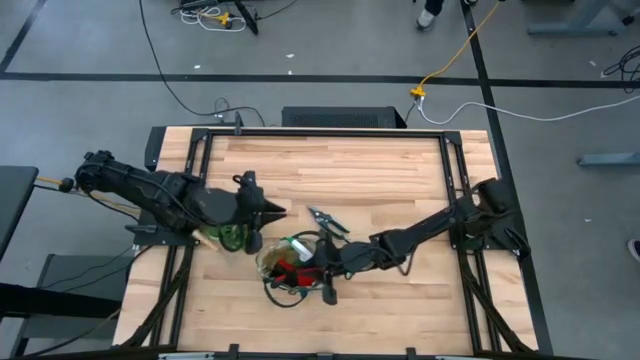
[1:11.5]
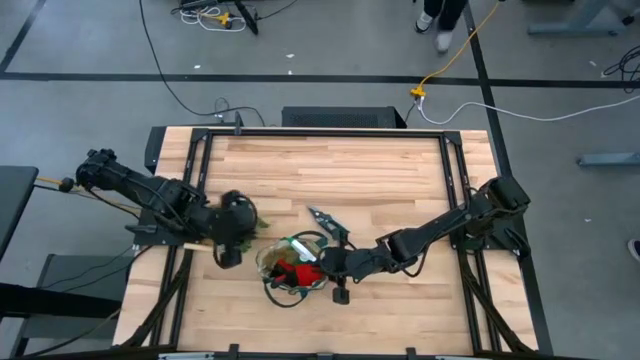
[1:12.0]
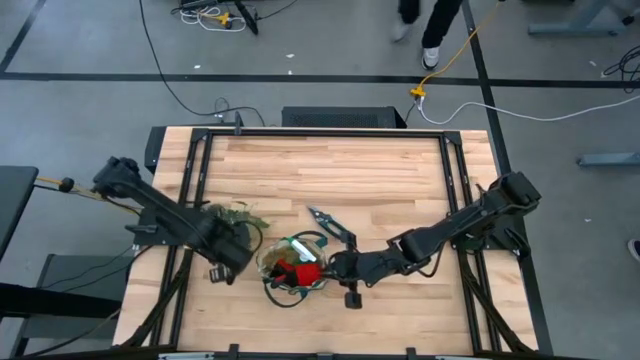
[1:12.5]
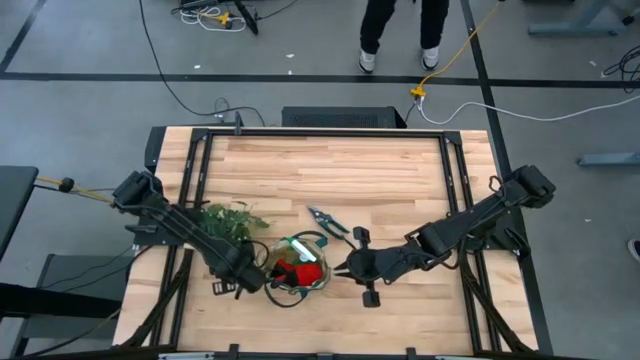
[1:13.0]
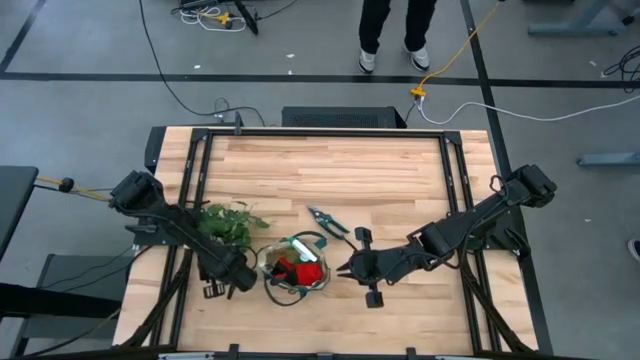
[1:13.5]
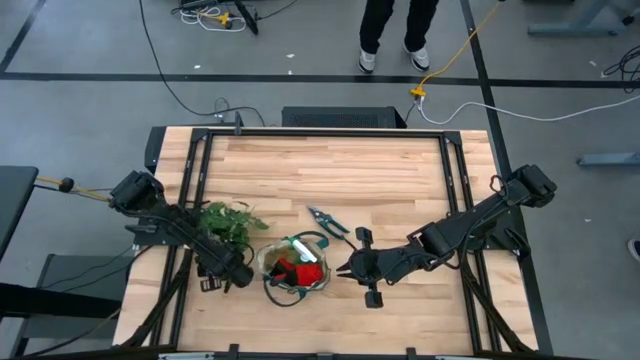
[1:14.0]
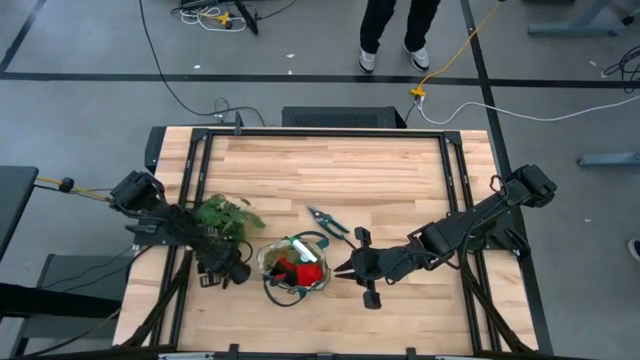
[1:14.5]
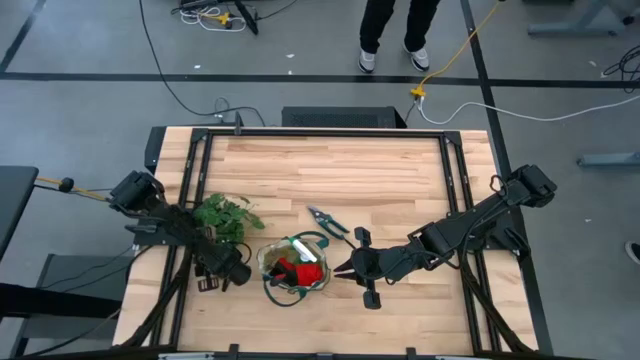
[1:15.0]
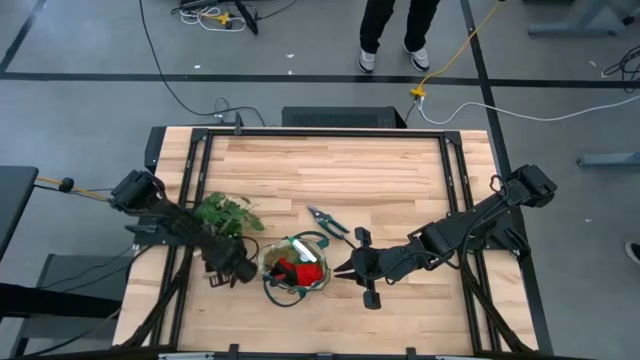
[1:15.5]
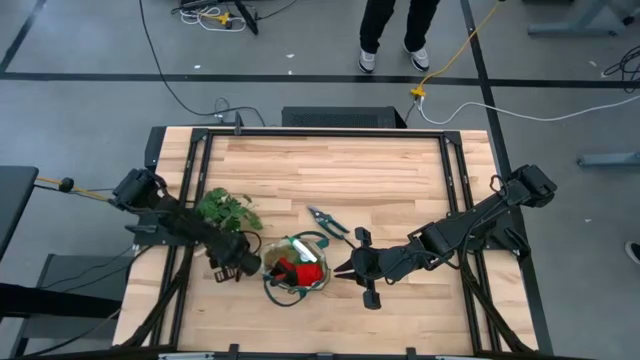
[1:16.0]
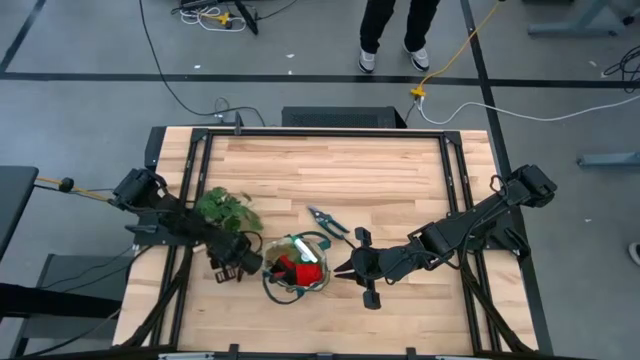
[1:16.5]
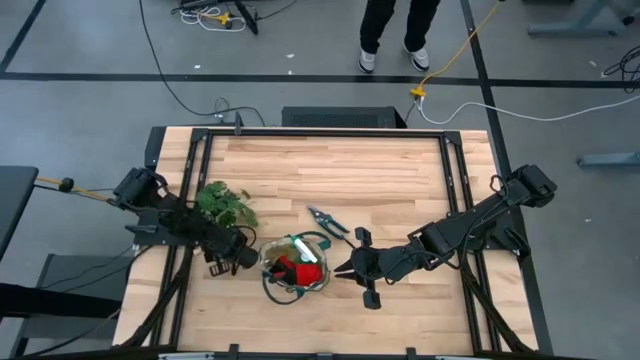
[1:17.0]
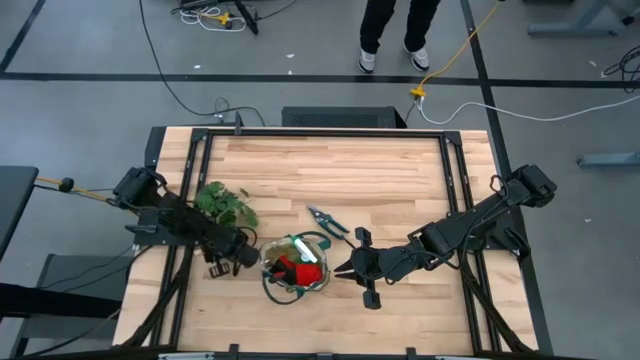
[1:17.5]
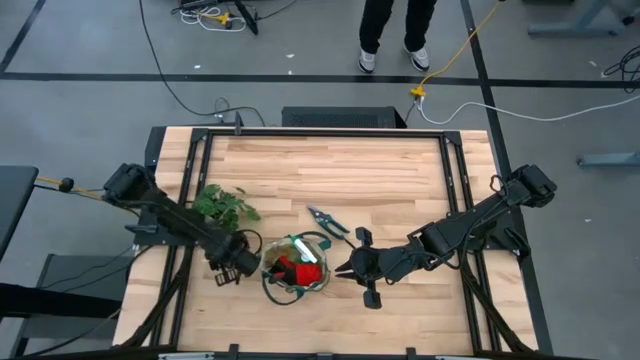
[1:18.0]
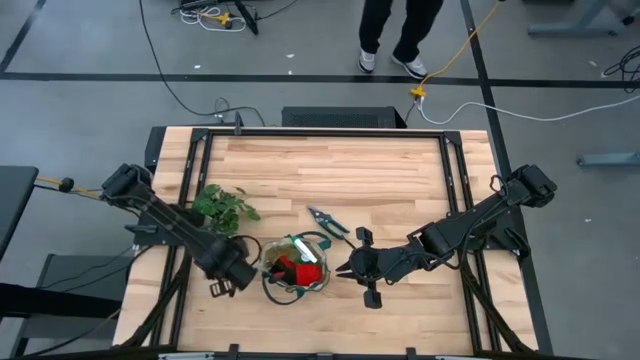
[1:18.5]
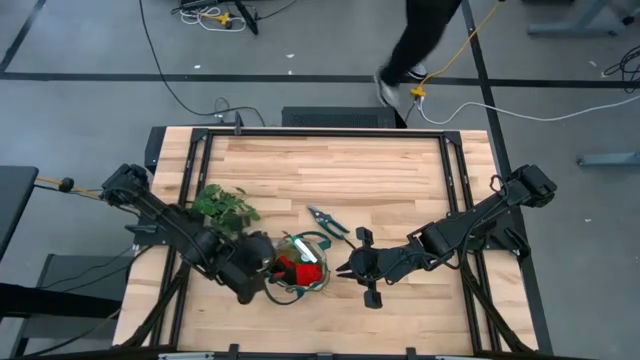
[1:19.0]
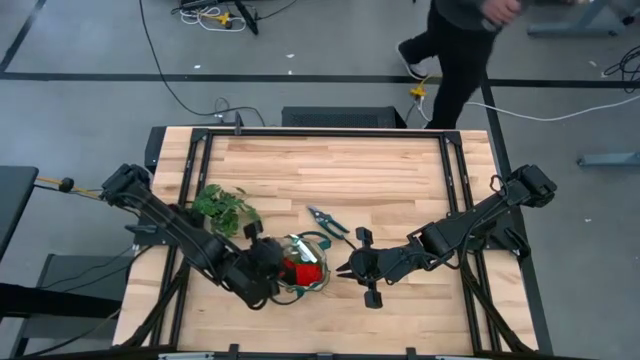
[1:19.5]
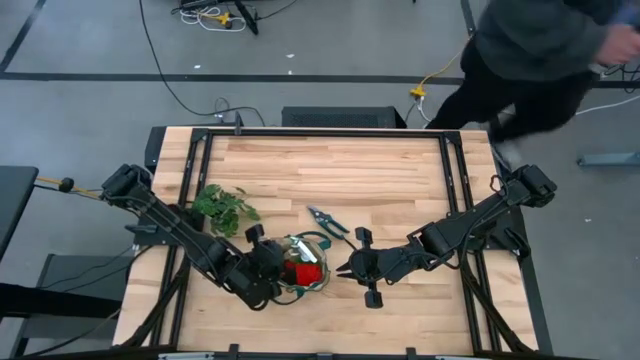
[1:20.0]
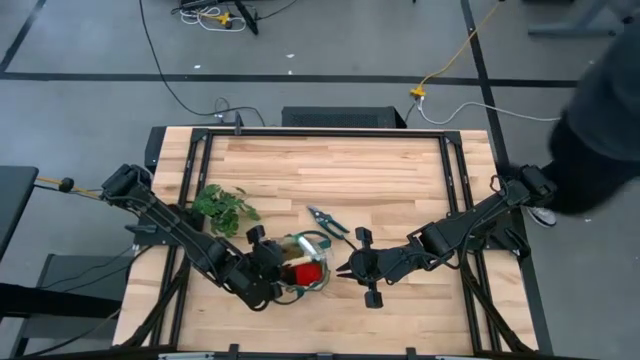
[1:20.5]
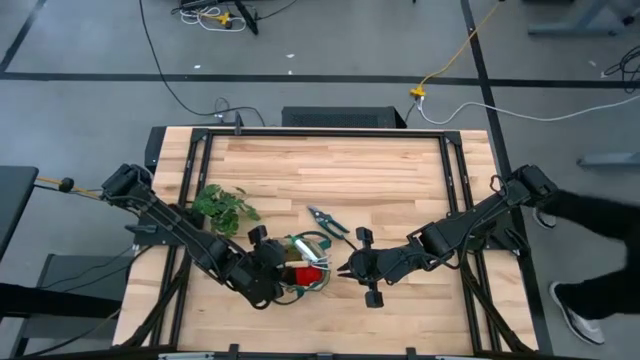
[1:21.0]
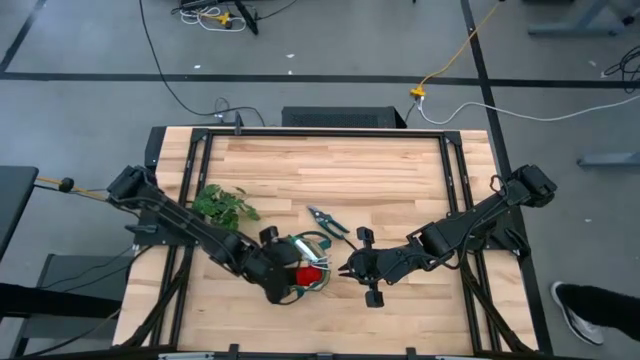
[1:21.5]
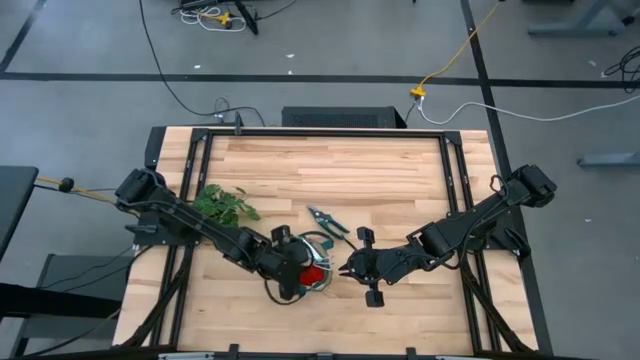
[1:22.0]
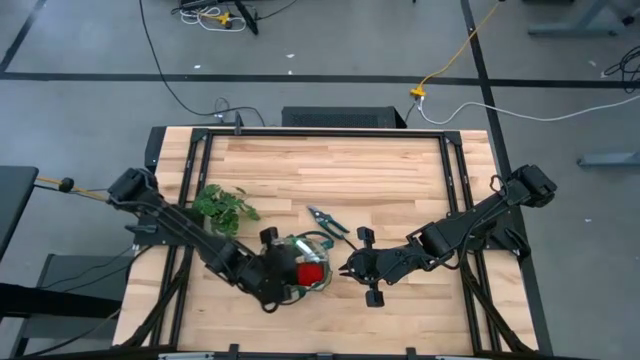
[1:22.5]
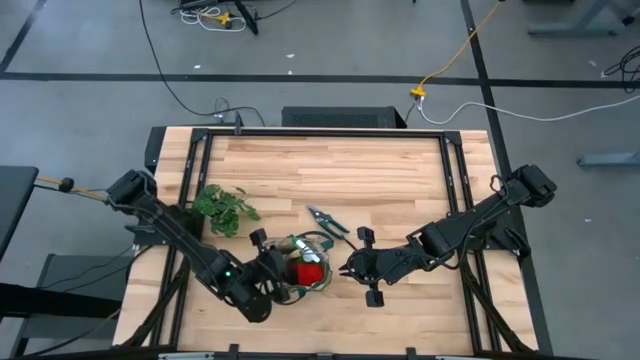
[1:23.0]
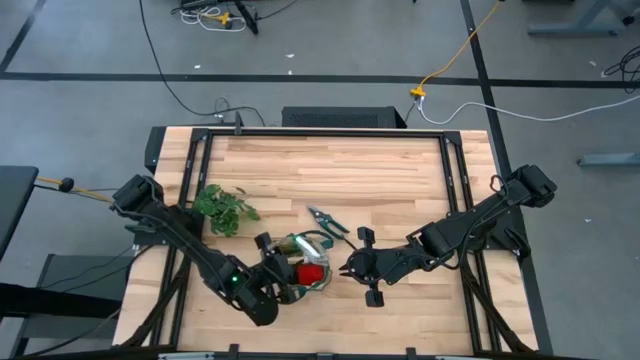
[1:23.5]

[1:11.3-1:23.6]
Task: Pick & Place Garden tools in Gardening bag
Put the hand rake into the gardening bag

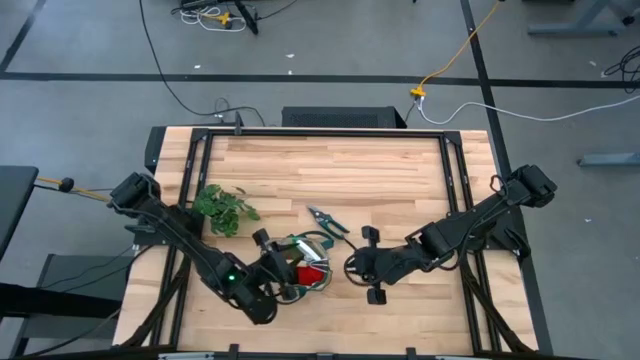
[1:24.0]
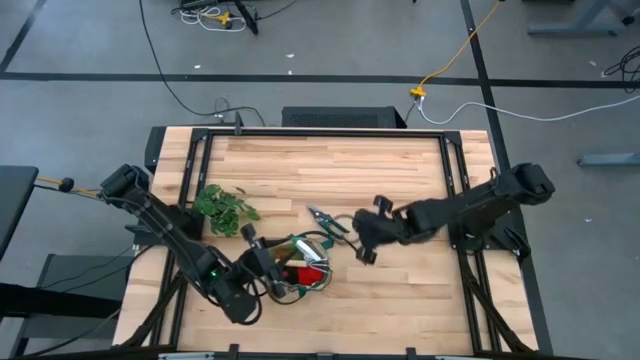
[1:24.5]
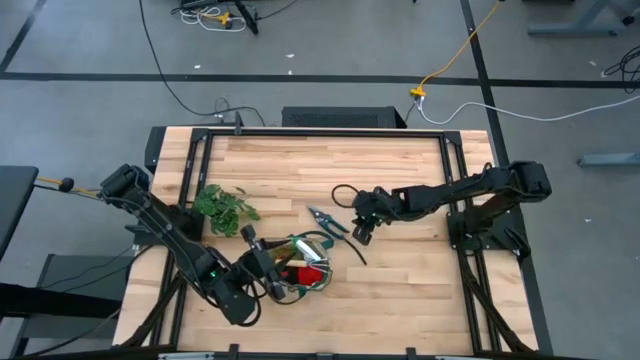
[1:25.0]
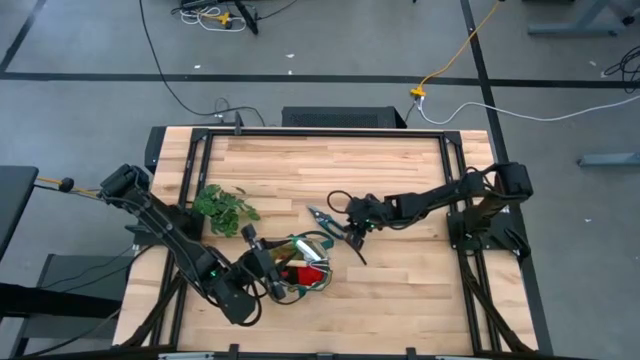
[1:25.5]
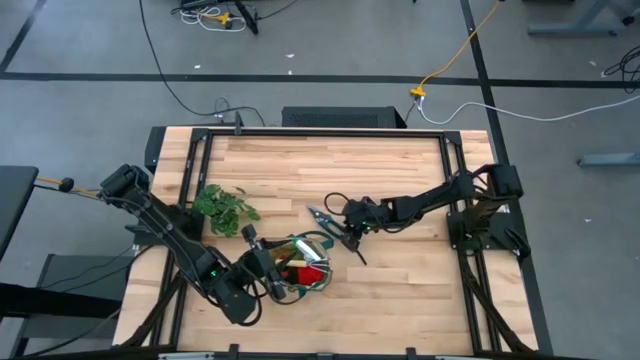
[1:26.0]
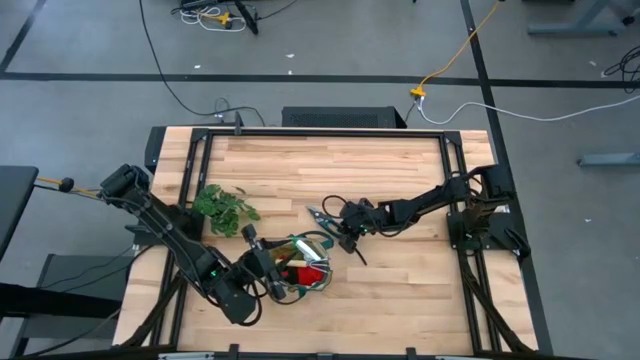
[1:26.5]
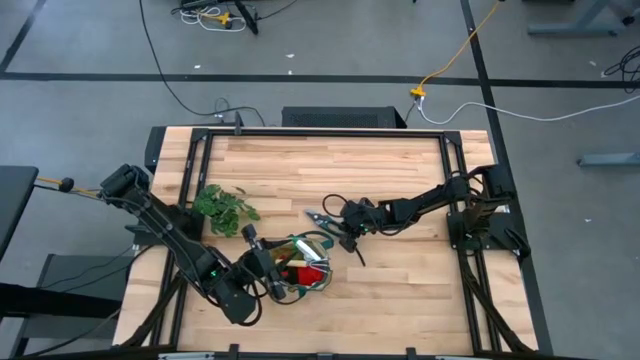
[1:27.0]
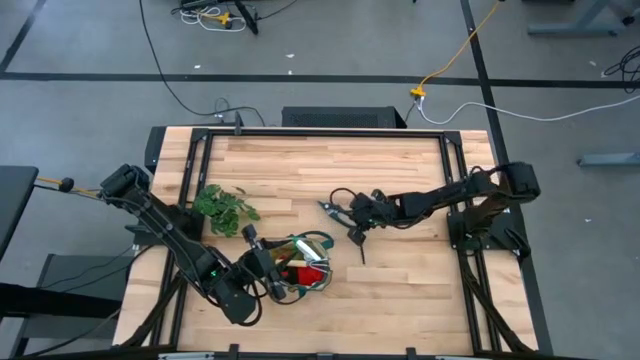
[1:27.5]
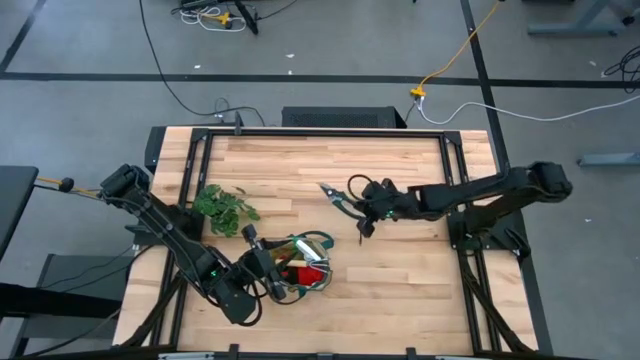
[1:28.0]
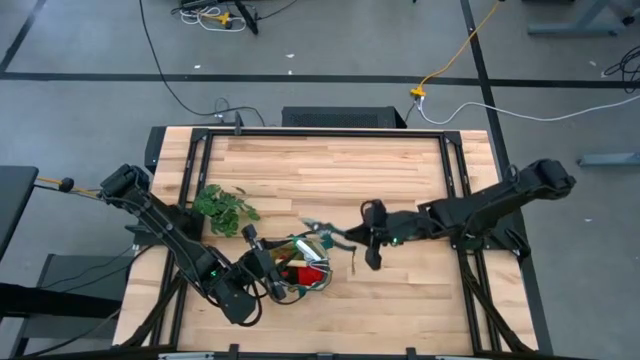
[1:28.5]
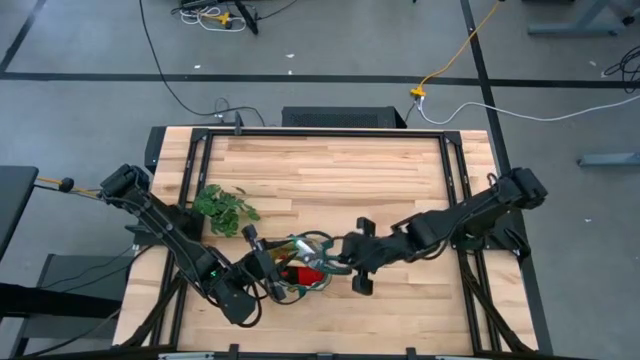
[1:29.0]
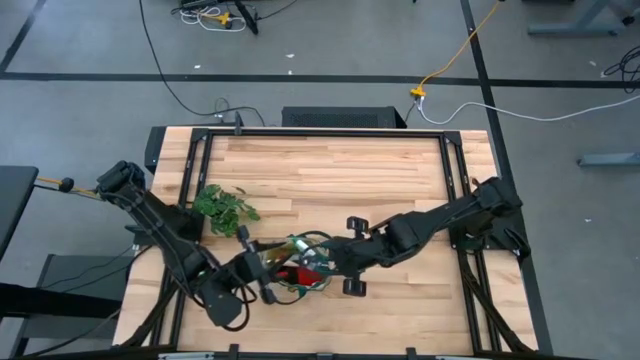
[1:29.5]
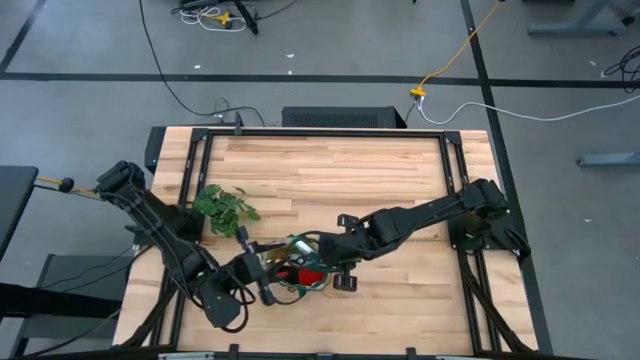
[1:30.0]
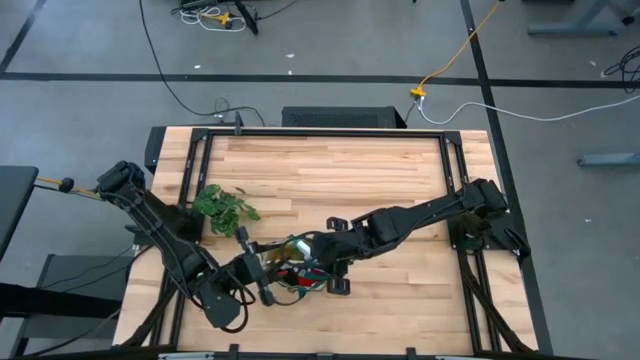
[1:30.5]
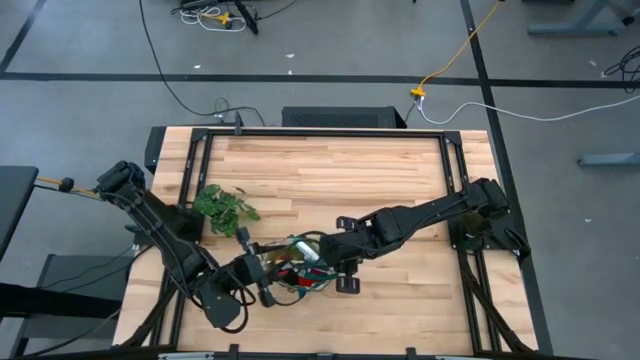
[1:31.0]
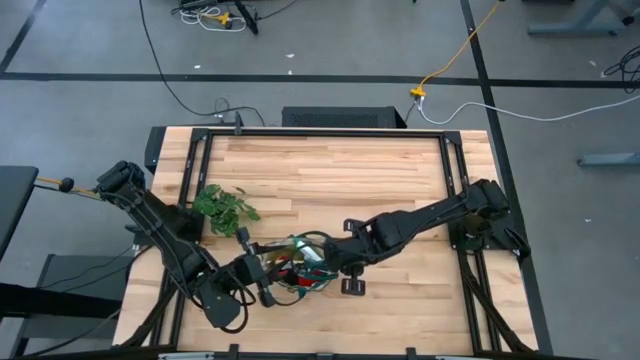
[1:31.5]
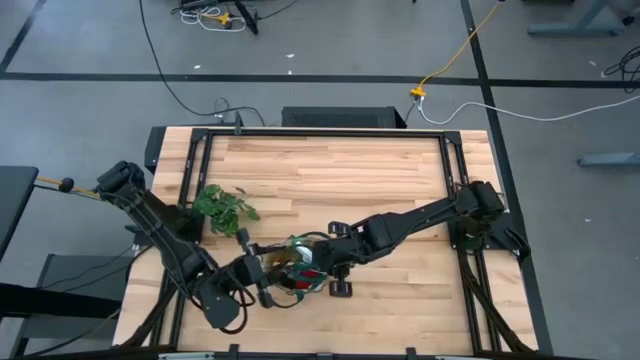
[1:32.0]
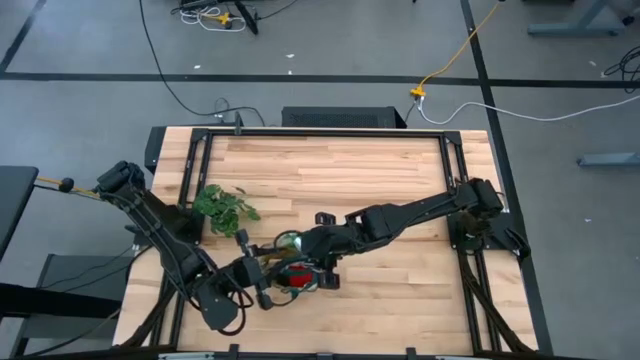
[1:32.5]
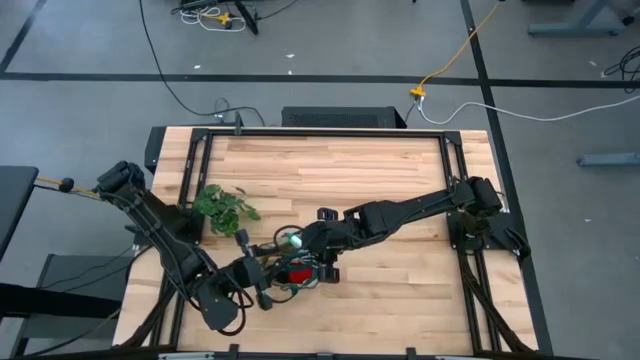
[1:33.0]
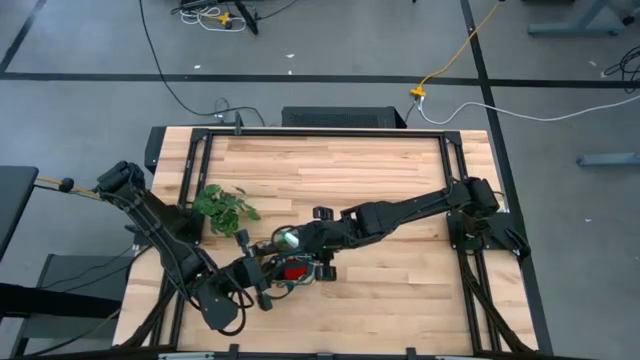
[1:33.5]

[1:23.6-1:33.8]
Put the green pruning shears into the gardening bag
